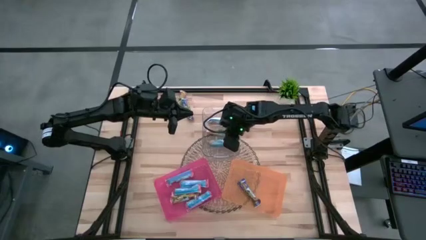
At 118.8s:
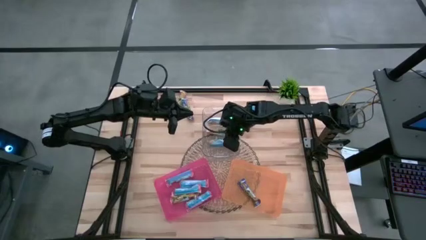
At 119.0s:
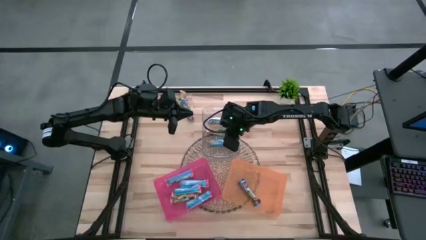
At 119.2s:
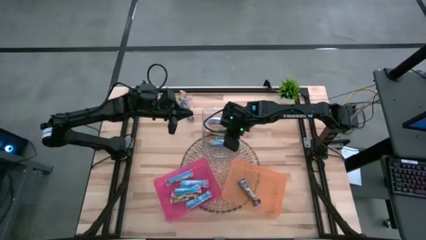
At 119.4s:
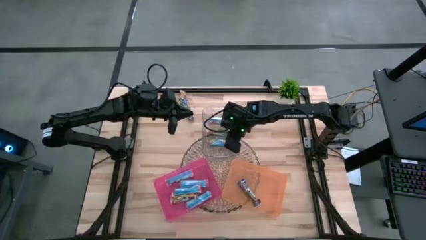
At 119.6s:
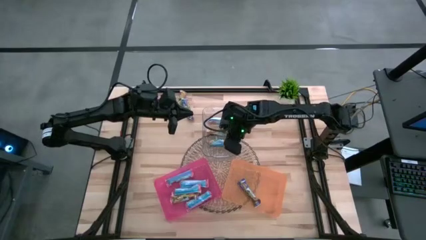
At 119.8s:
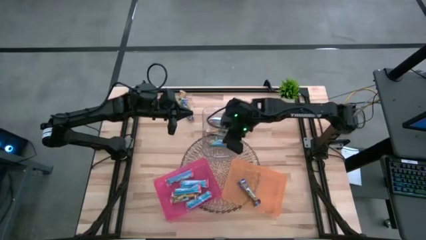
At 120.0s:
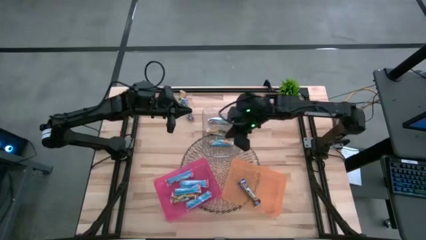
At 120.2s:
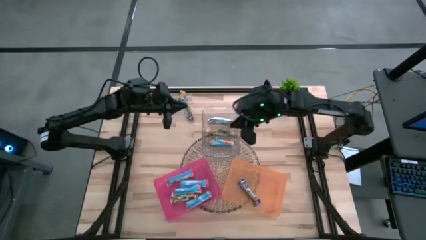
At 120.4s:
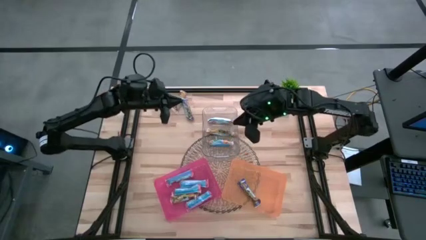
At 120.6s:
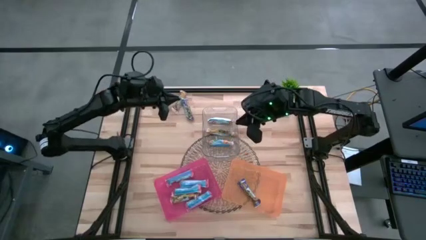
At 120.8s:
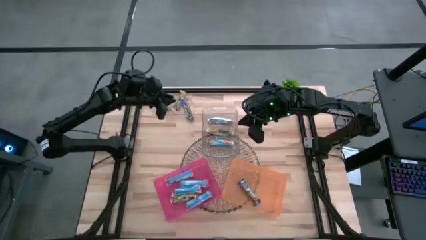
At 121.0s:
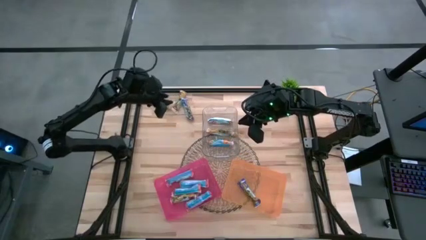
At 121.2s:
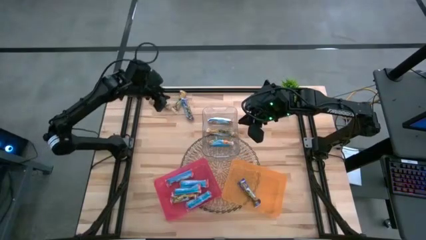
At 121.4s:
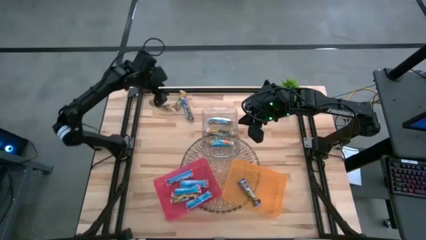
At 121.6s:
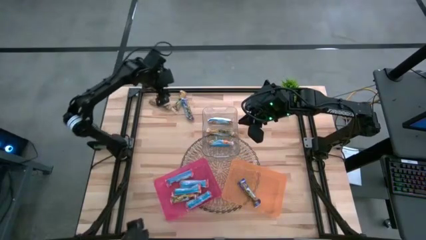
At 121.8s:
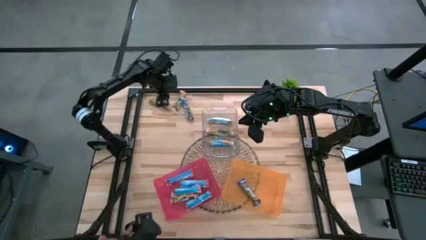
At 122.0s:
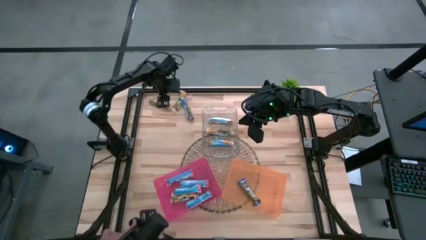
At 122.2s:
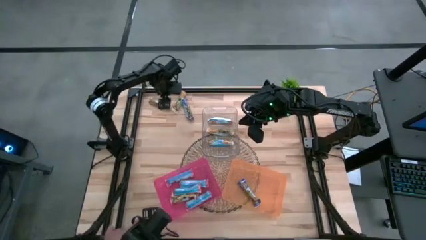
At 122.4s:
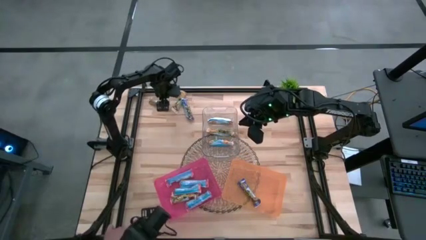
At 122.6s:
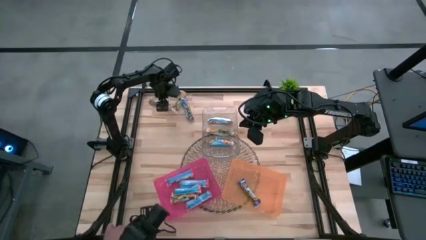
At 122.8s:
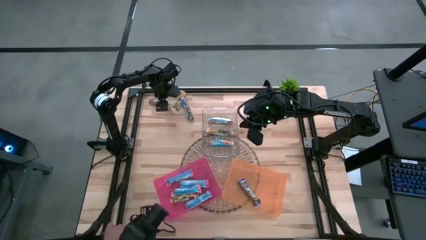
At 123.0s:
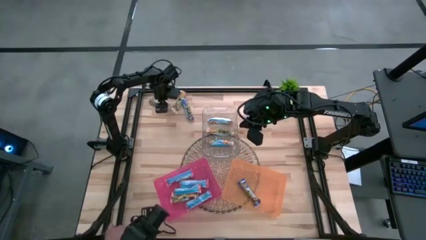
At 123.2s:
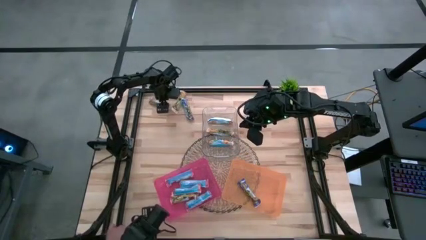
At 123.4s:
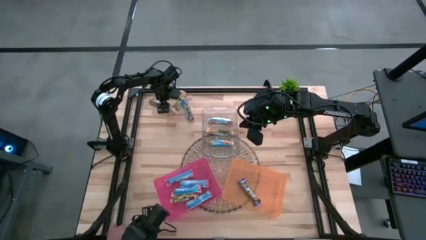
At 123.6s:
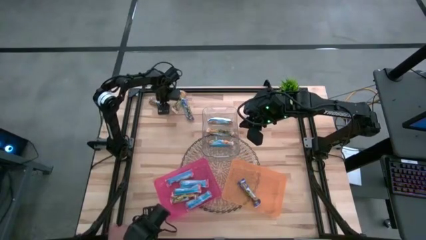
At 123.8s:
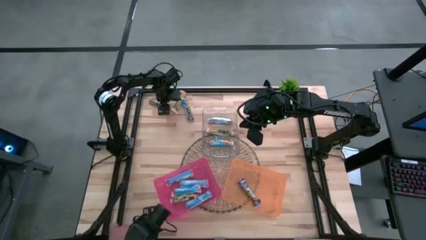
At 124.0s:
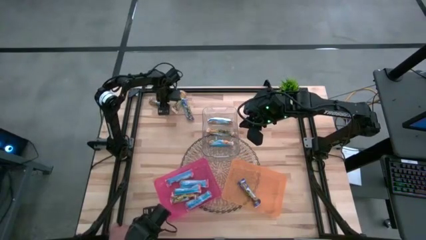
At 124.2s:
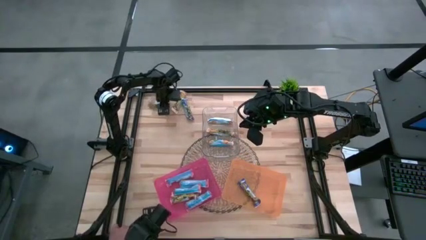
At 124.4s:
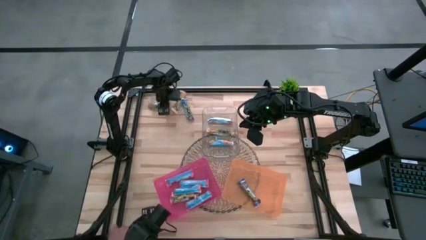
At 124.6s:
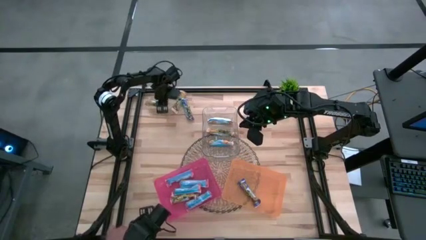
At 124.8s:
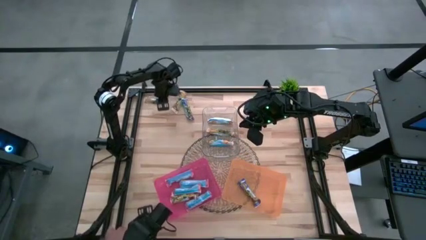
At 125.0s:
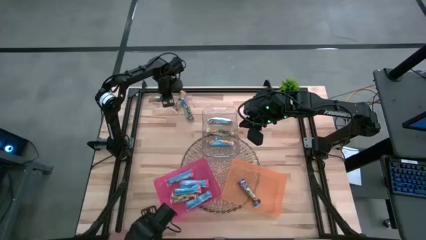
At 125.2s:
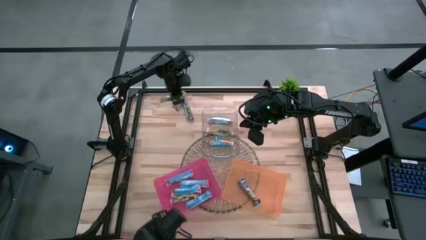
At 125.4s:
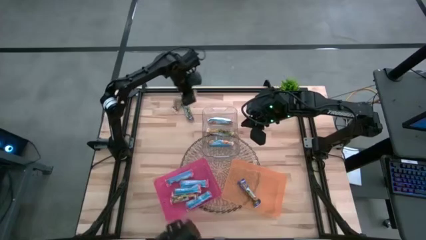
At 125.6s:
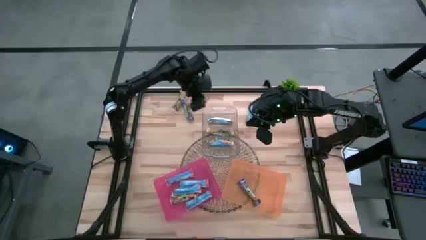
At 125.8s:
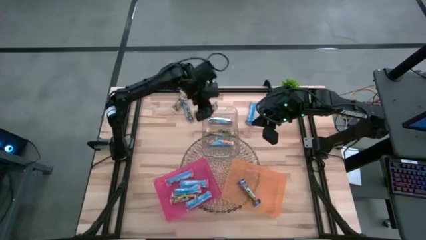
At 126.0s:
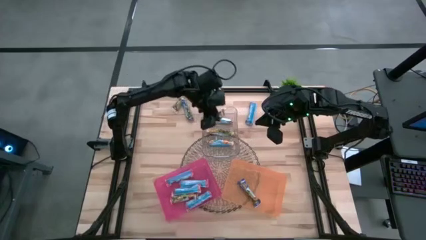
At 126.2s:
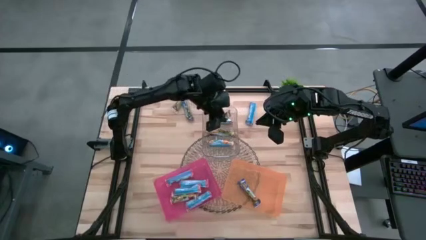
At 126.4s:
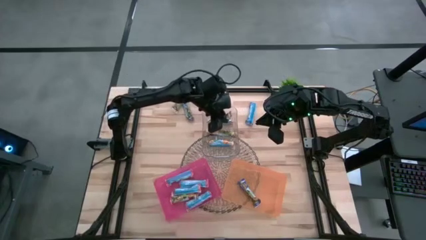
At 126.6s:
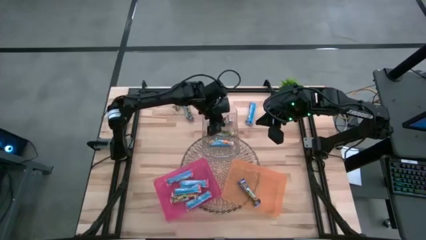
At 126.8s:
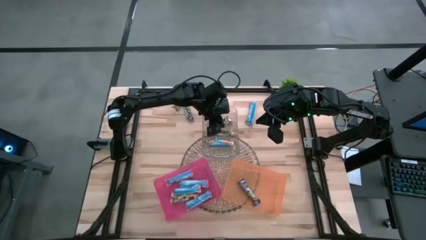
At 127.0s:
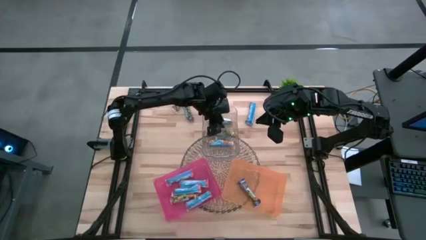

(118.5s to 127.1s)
Task: Pick and place Granola Bars by type
Put the orange granola bar into the transparent bin

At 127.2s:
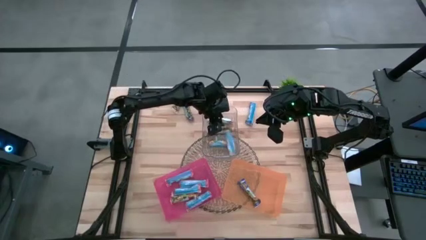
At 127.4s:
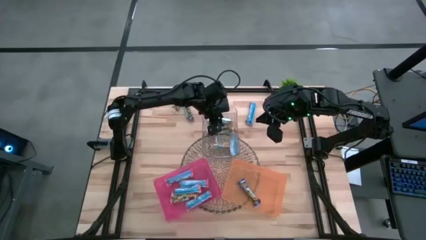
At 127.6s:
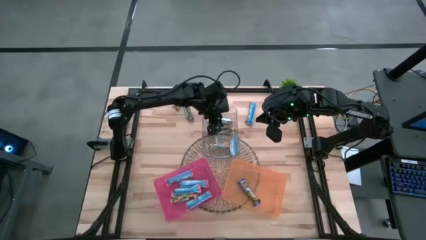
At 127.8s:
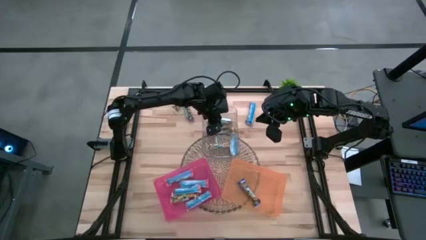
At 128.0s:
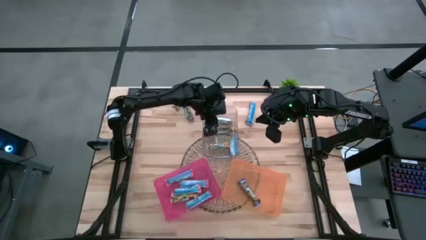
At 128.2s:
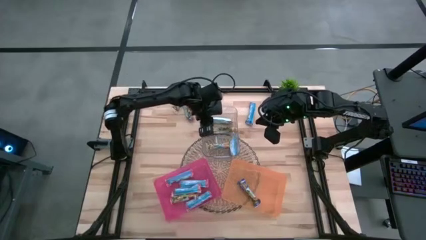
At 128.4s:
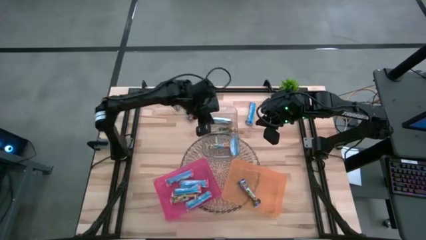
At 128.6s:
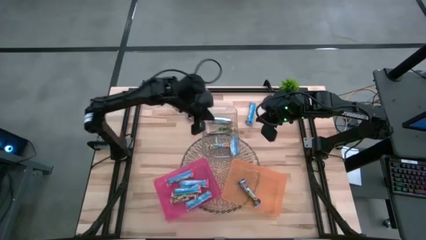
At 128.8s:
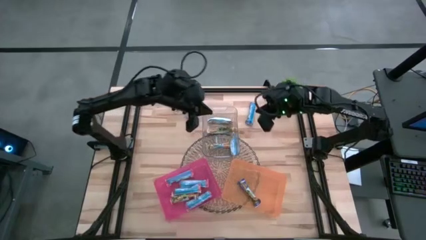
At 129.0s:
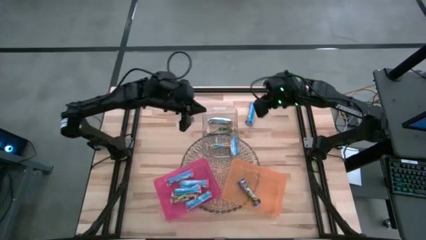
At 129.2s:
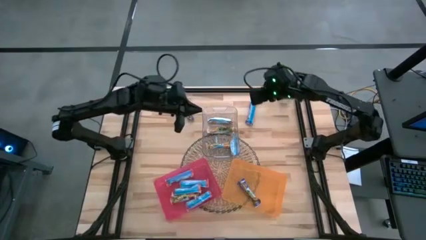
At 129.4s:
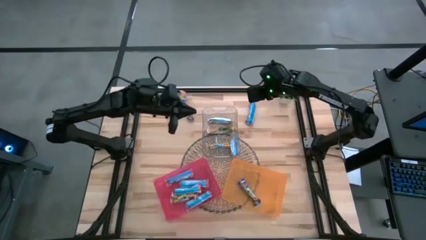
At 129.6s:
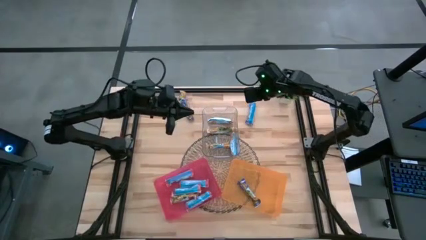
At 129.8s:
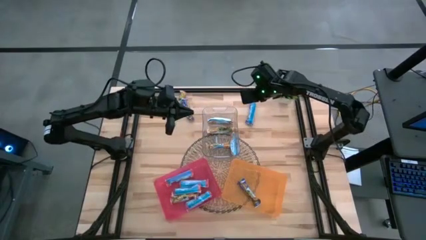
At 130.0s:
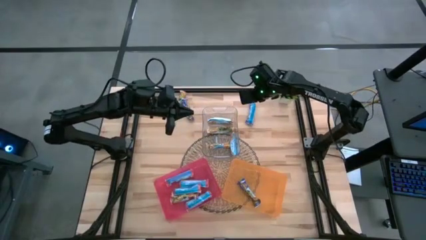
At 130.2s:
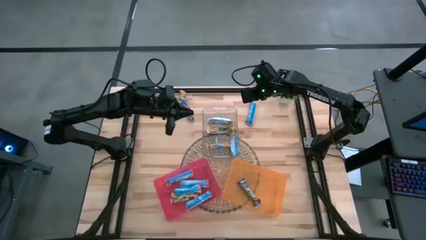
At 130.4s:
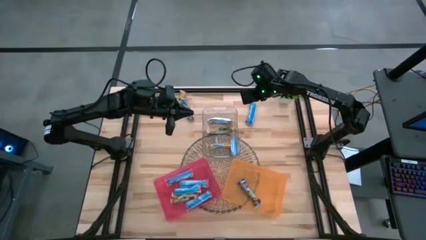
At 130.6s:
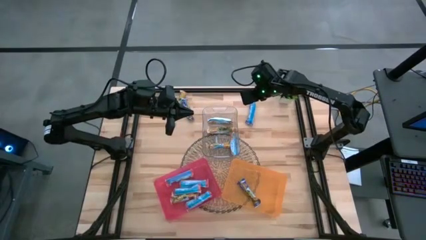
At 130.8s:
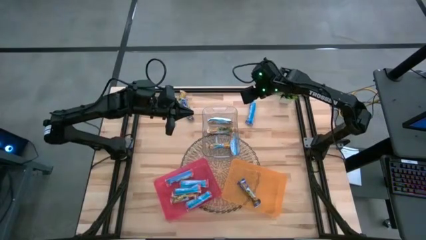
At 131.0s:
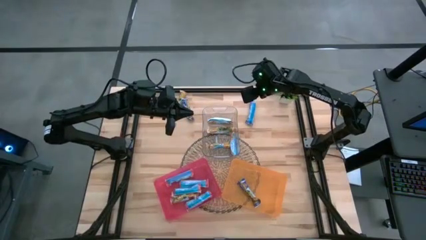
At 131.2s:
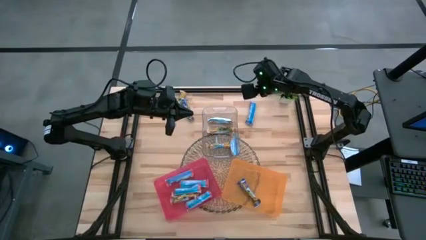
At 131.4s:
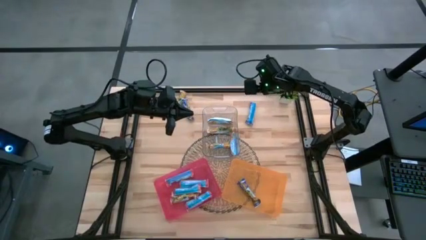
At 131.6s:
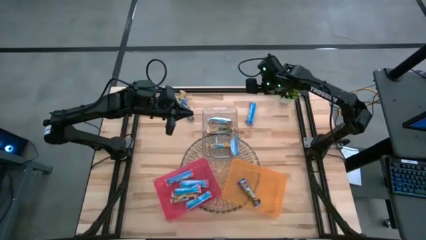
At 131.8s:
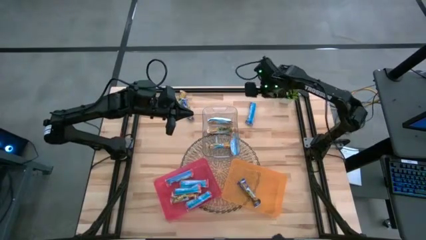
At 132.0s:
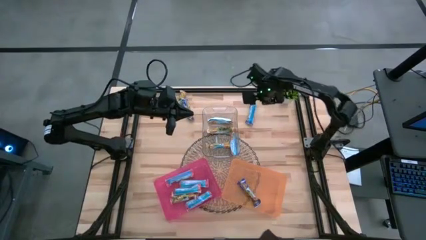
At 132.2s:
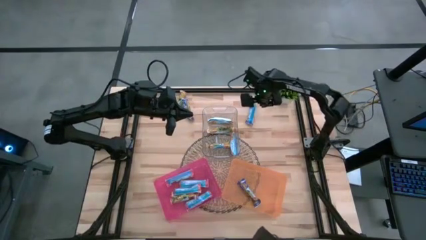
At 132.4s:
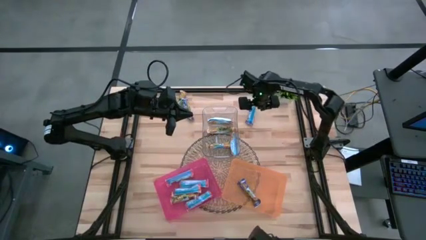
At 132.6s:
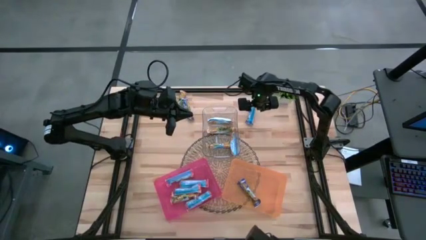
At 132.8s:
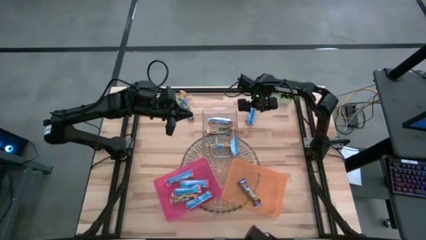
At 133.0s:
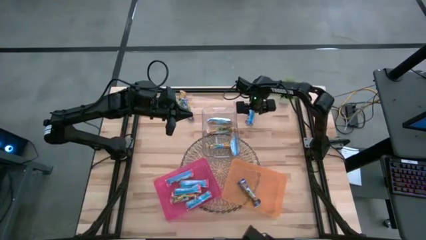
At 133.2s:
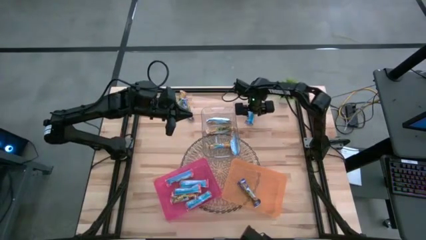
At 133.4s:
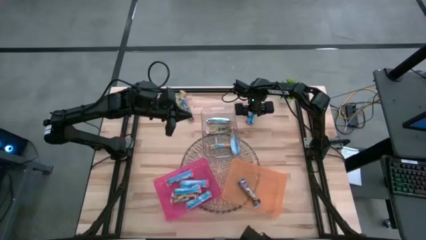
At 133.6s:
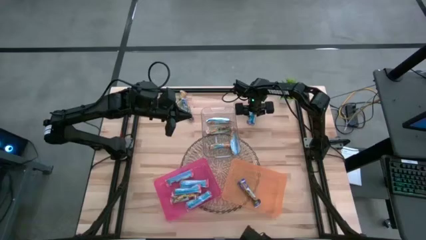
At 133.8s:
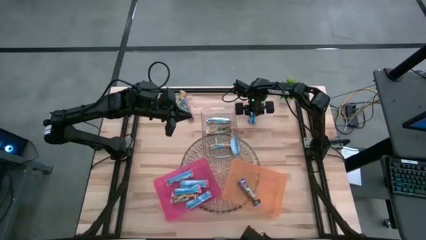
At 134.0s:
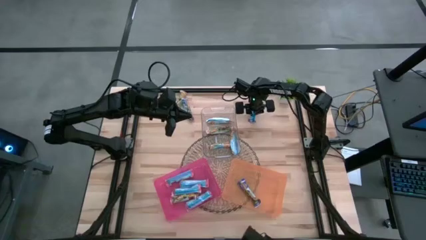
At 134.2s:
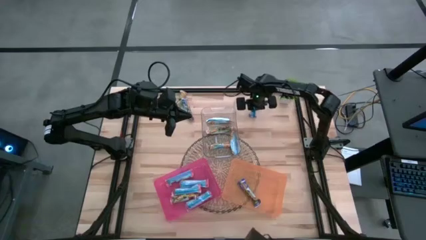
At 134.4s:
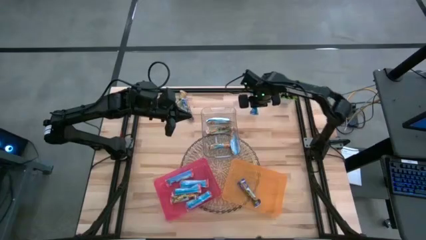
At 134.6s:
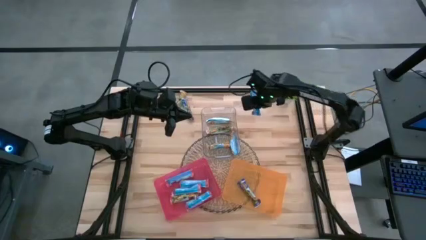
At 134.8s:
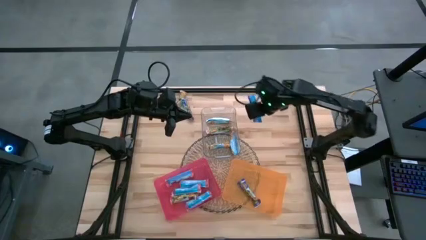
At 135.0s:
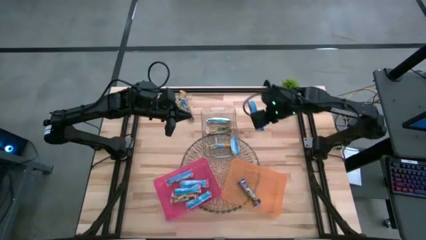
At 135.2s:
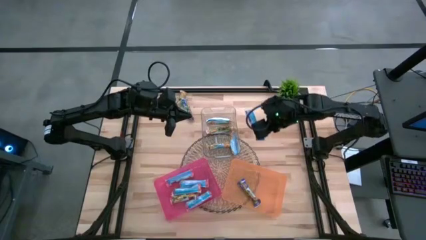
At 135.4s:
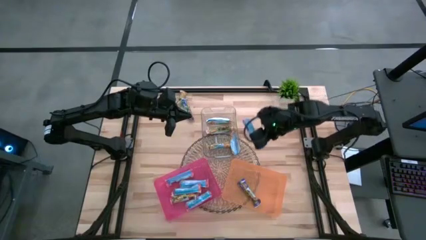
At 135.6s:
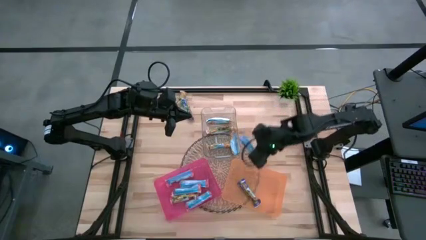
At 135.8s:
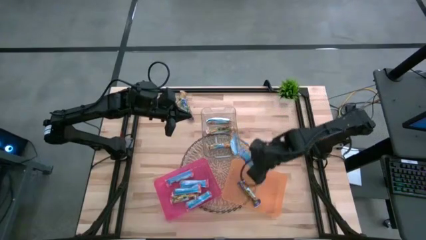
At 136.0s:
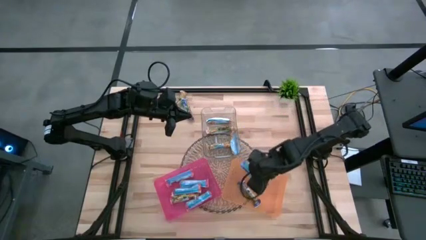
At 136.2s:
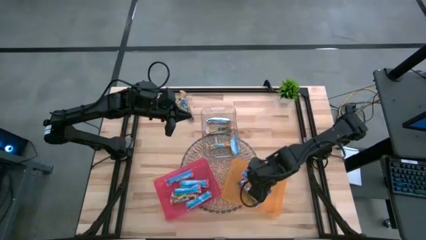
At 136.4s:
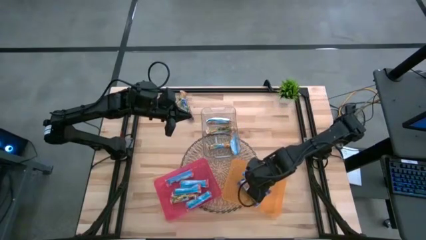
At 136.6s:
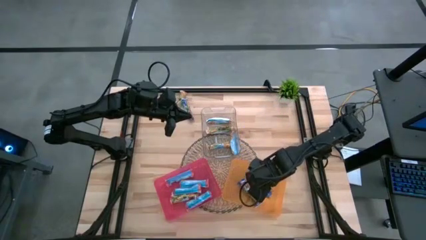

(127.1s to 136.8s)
Put the blue granola bar into the orange bin
